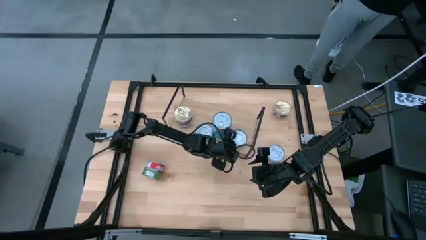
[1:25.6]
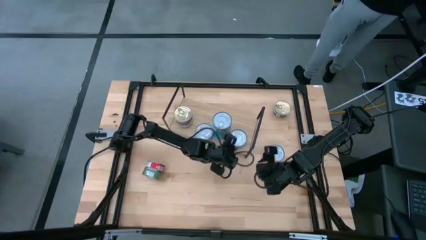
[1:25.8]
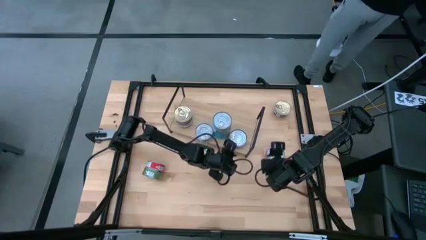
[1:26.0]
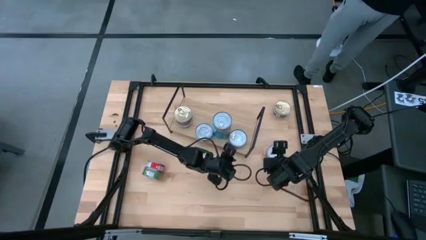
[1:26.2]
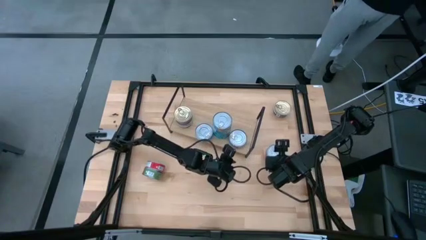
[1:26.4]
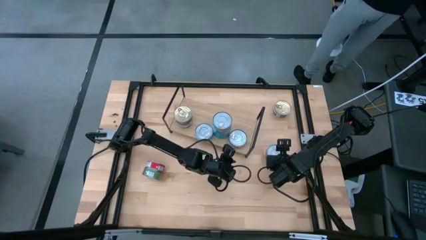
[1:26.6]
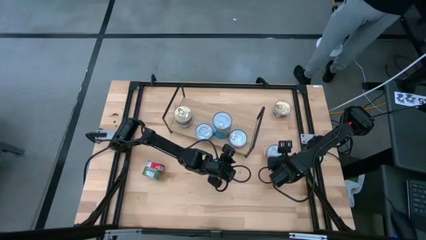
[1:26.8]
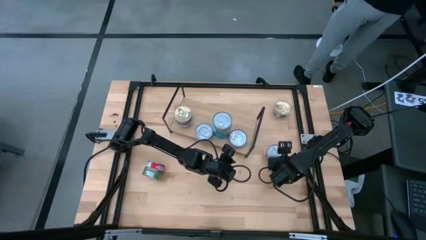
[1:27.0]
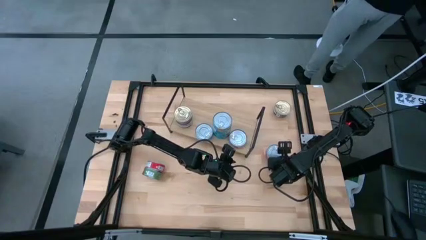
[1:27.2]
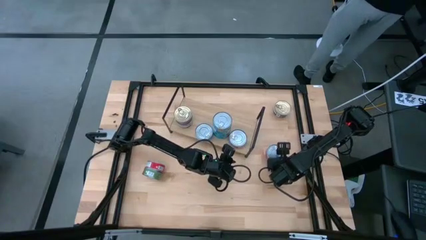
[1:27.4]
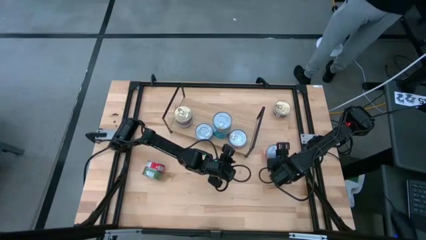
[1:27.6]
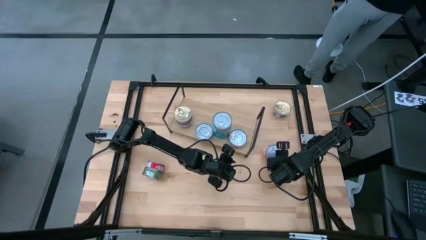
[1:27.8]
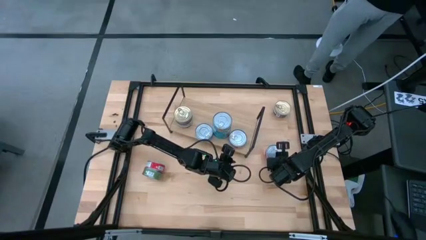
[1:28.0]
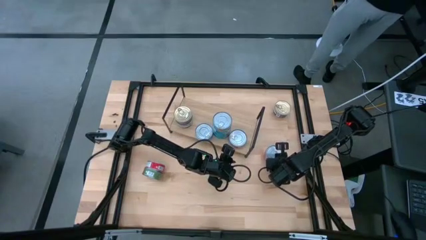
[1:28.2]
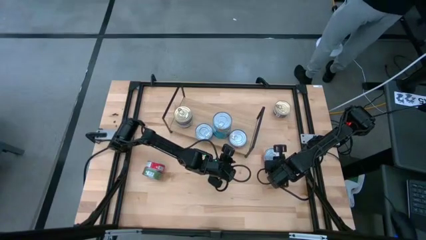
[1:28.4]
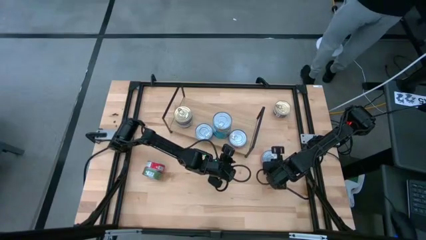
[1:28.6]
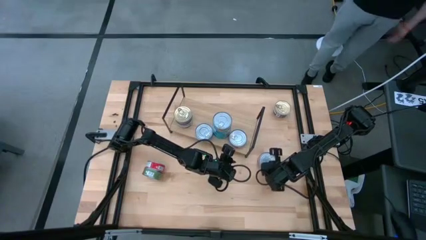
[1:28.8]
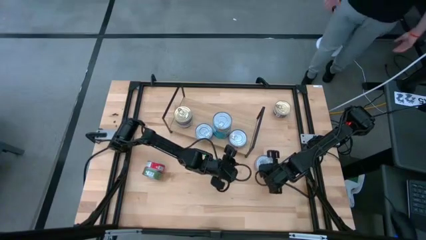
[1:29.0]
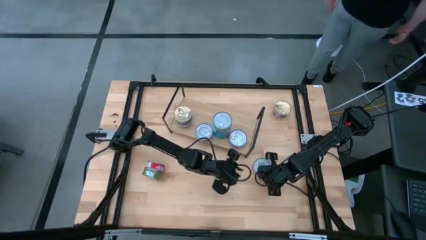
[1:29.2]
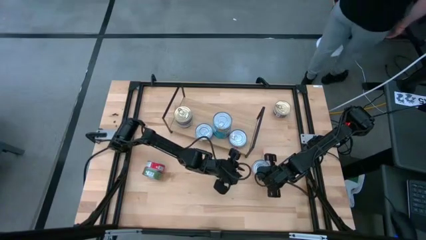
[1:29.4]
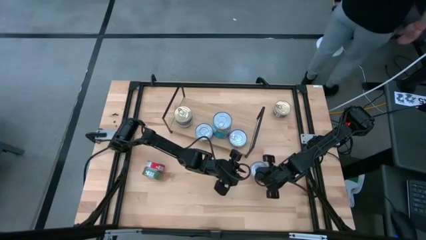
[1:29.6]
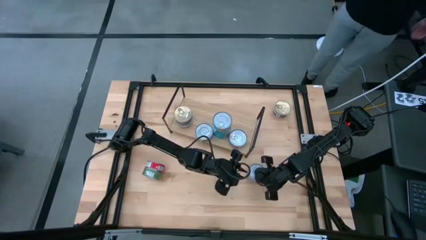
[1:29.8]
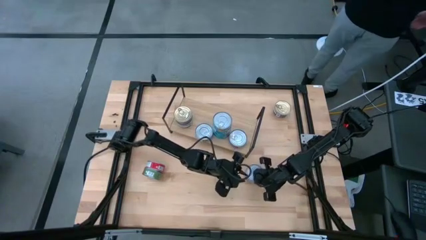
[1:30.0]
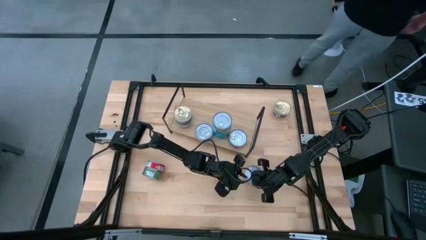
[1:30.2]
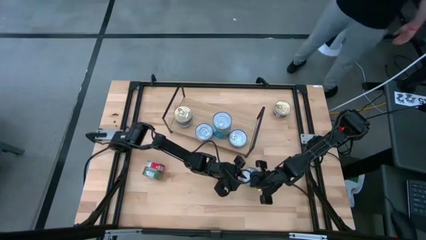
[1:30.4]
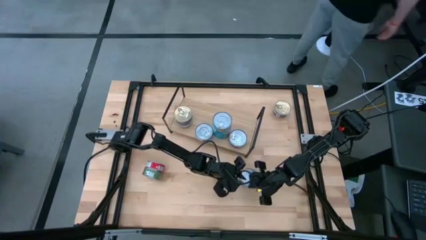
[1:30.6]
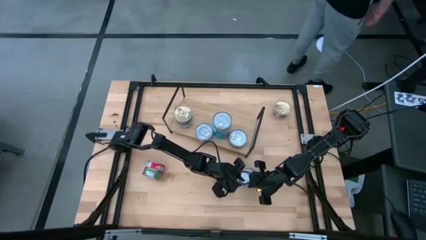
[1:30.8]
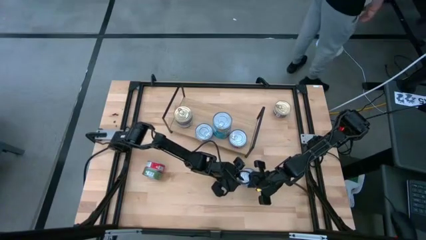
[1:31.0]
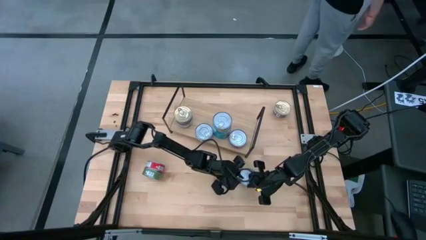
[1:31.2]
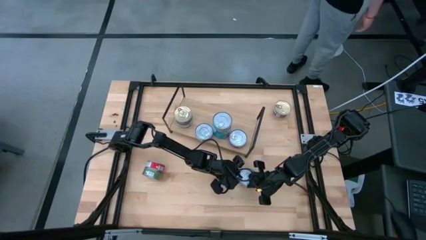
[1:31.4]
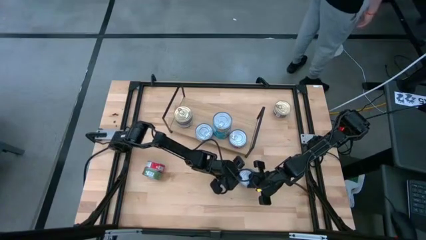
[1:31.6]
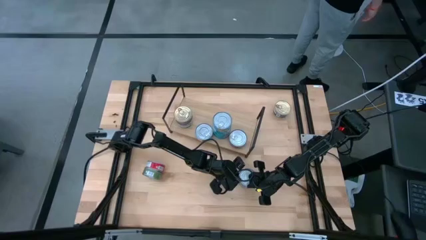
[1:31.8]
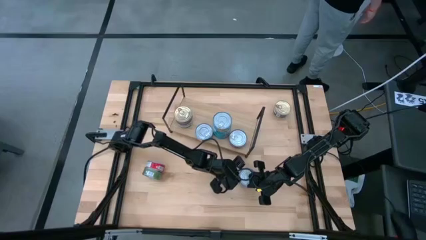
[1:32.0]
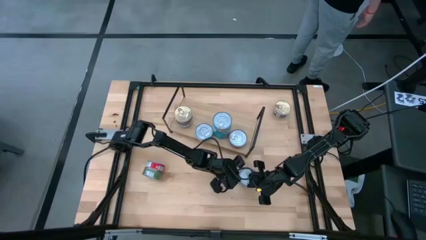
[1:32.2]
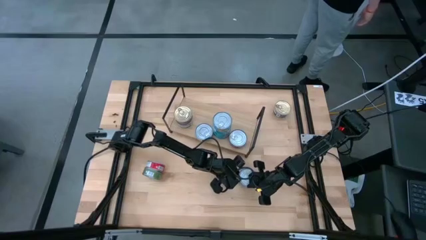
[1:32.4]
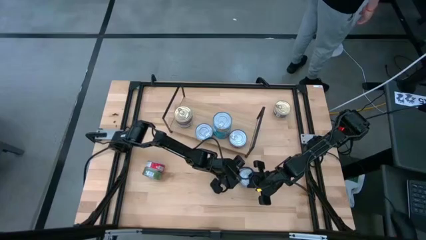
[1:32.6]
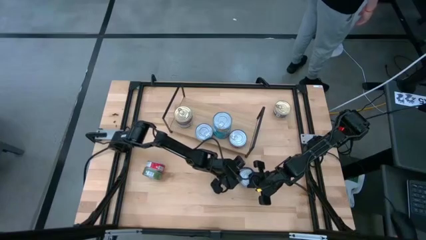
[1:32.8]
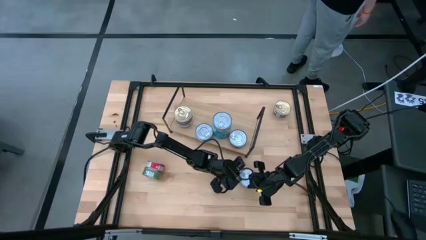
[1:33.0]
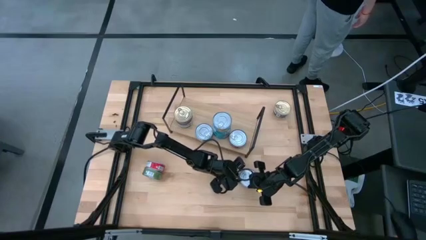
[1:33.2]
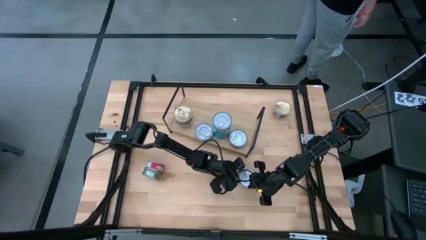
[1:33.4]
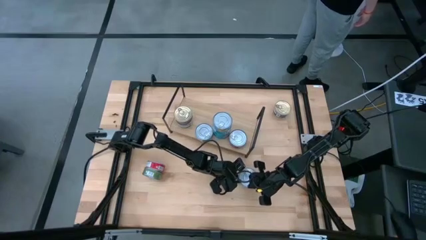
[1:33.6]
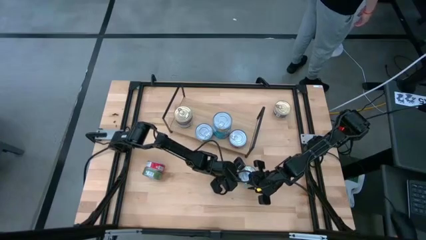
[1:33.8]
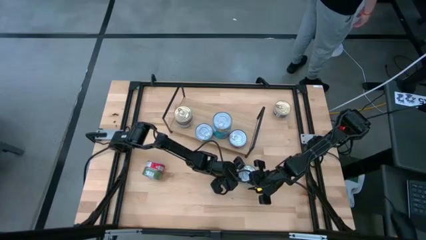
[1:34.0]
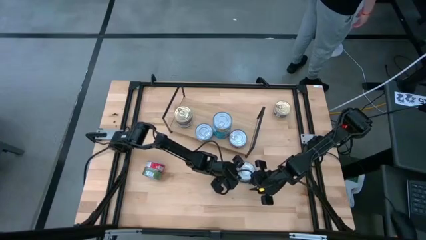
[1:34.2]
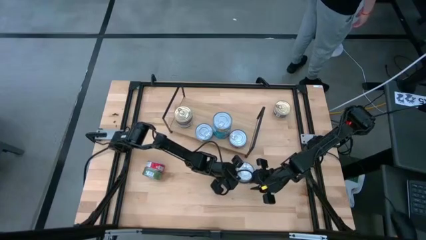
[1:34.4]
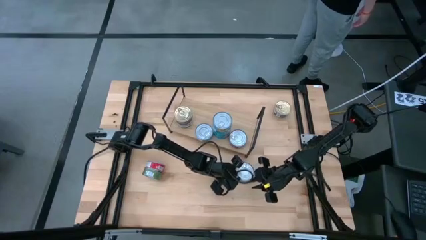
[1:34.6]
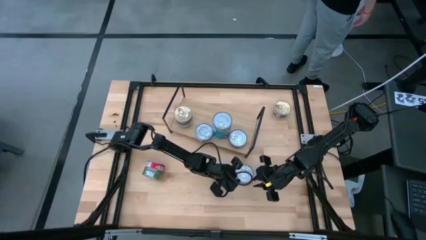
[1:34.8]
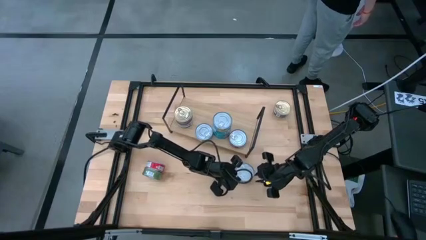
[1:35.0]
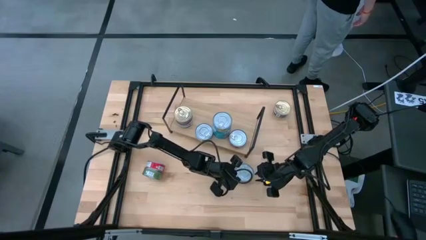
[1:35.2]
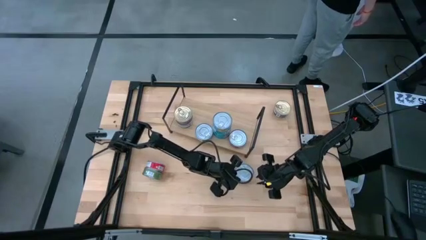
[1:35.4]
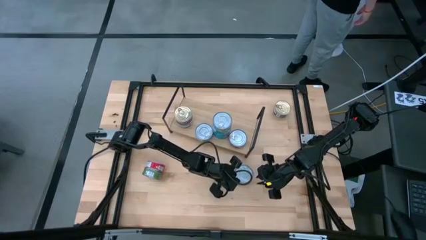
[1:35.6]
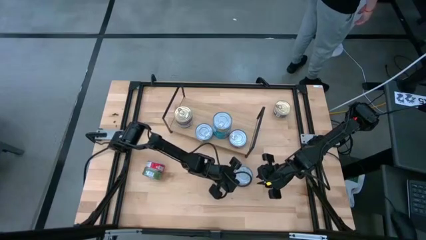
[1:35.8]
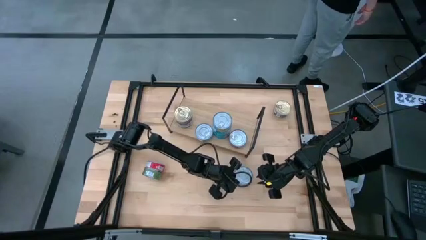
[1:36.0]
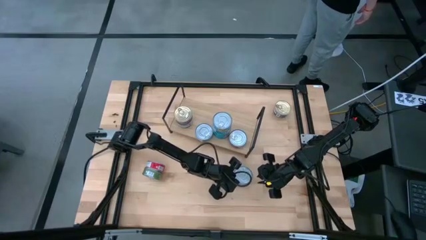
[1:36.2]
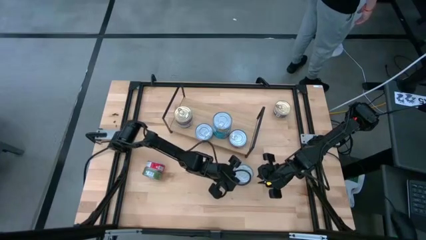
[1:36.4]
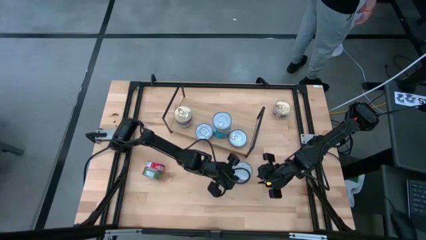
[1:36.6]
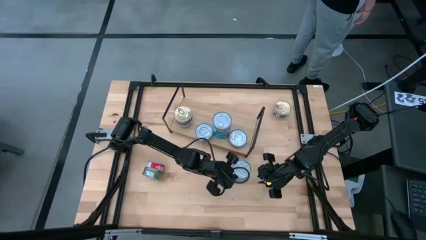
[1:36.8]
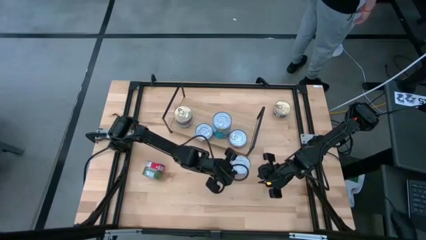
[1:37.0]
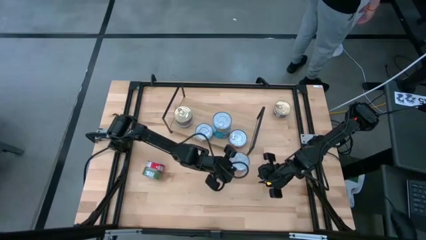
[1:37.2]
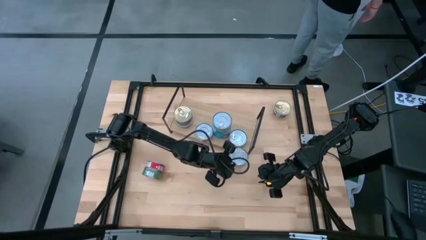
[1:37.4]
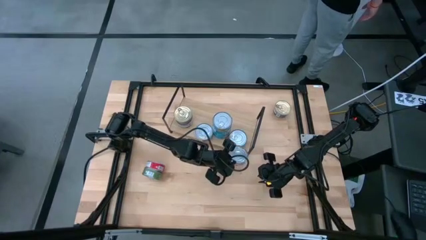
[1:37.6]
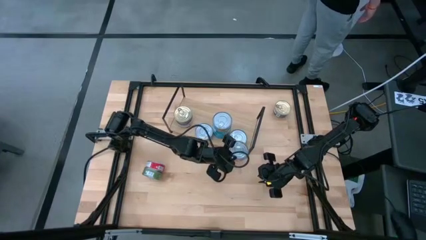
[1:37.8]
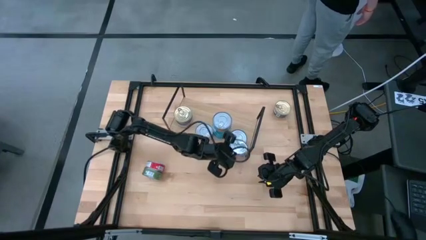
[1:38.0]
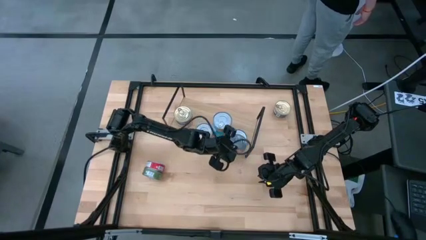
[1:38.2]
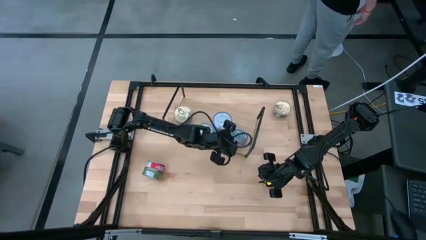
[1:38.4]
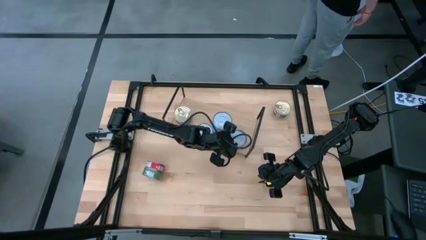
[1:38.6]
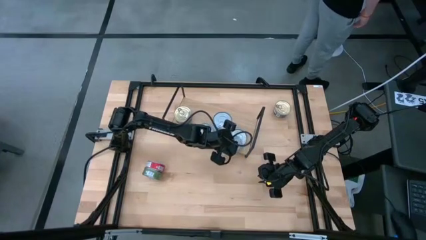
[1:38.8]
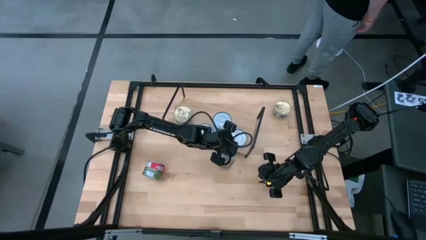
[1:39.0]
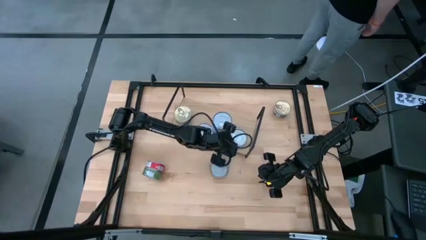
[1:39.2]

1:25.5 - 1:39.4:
Task: Stack canned seafood by type on shelf
Stack the red tuna can on top of the red tuna can on the shelf

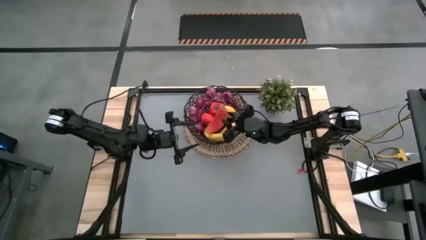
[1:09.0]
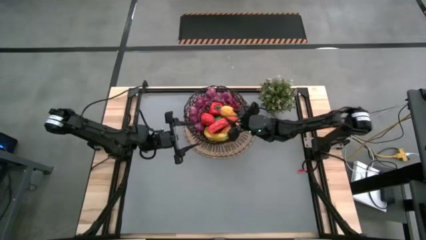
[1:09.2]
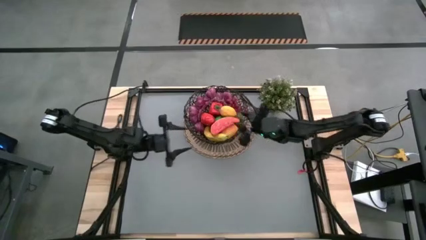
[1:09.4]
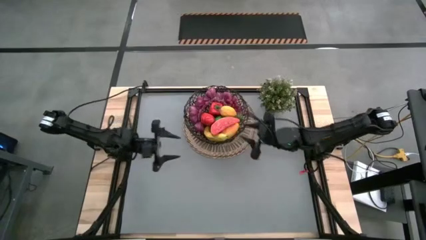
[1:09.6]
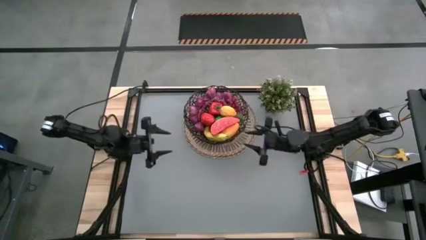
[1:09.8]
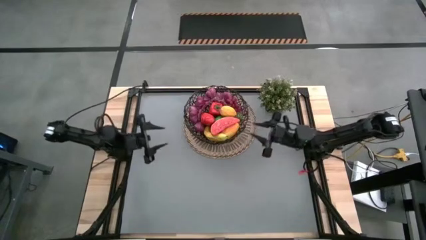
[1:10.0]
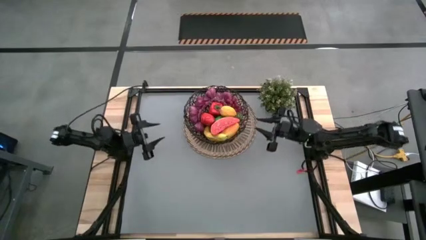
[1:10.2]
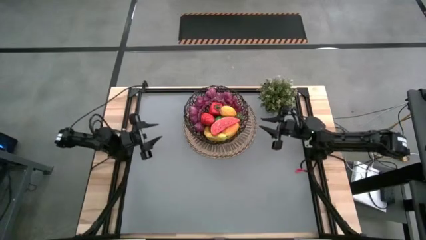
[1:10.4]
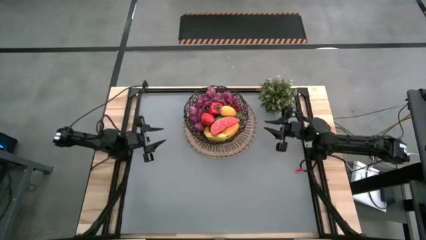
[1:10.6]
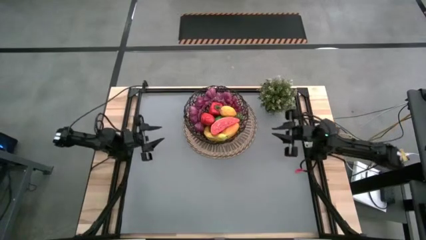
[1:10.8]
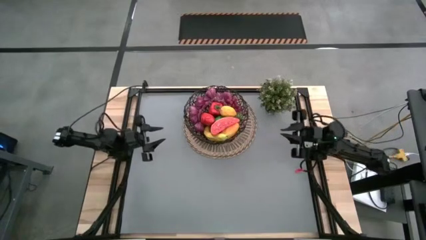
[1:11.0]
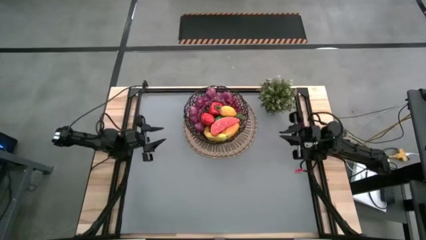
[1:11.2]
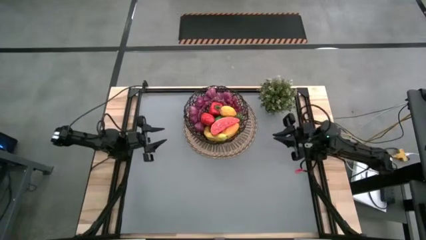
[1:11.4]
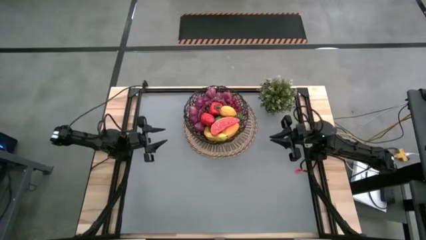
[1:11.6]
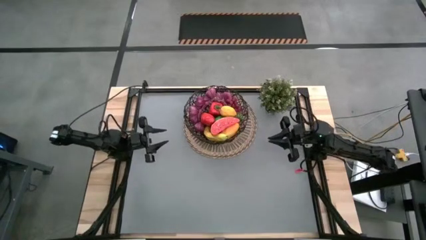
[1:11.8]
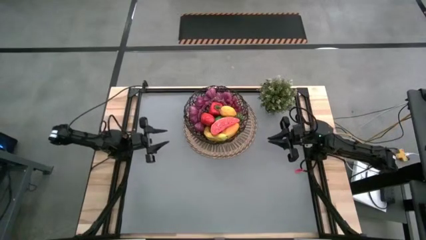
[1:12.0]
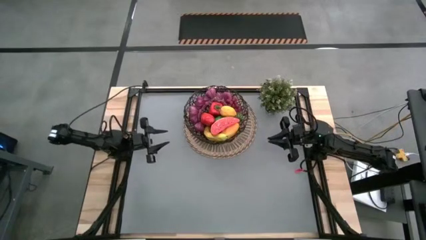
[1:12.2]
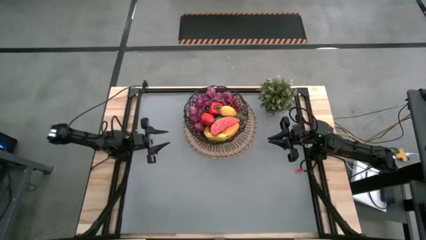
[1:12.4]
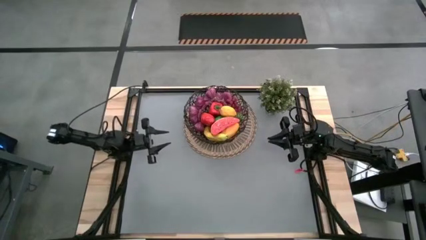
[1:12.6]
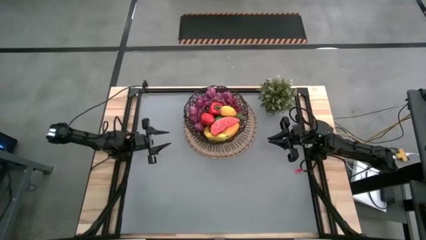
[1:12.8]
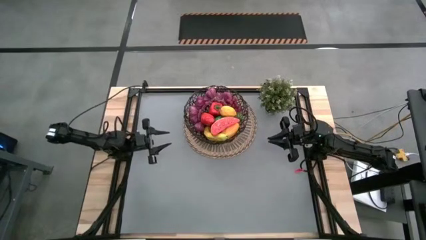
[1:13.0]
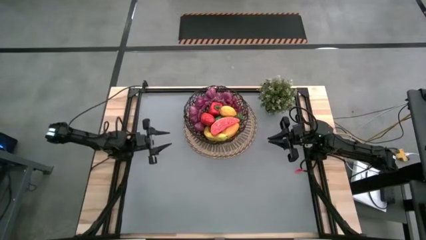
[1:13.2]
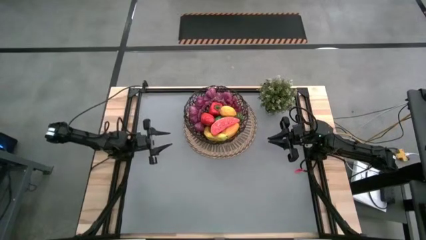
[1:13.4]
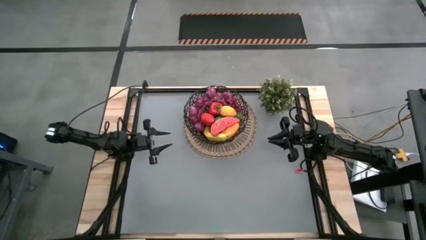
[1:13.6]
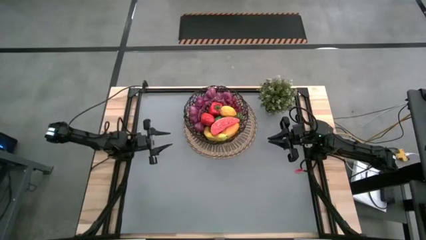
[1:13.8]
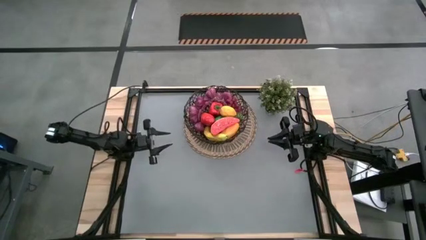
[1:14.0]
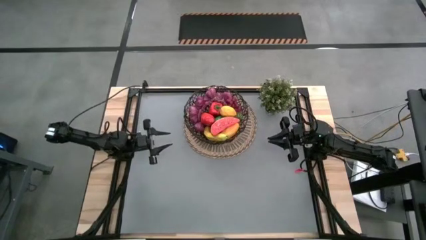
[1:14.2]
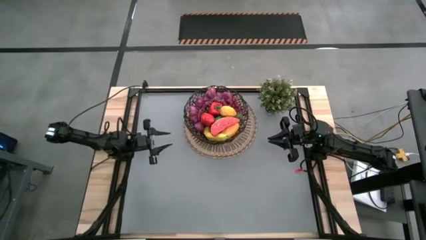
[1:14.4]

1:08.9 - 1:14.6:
Task: Build produce basket
Return to Home Position
